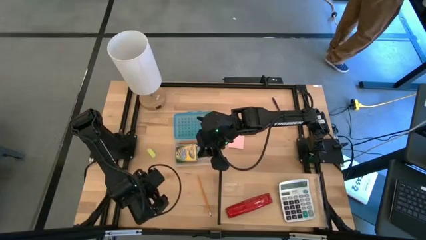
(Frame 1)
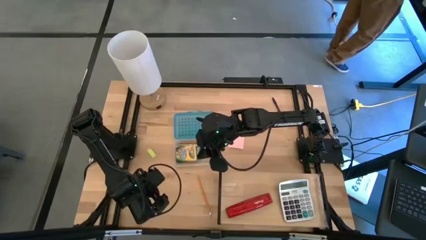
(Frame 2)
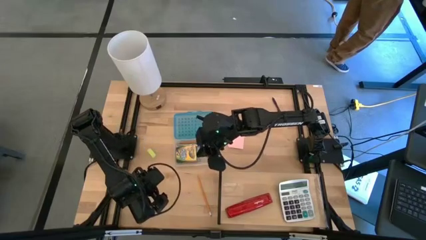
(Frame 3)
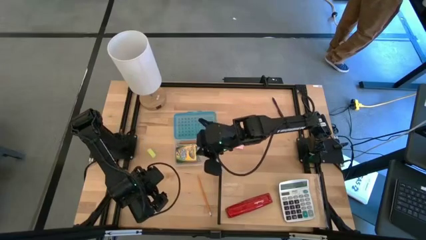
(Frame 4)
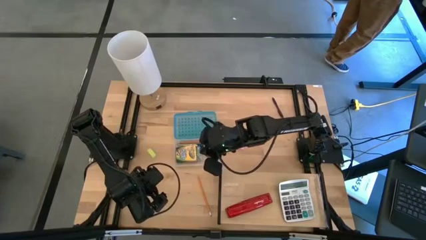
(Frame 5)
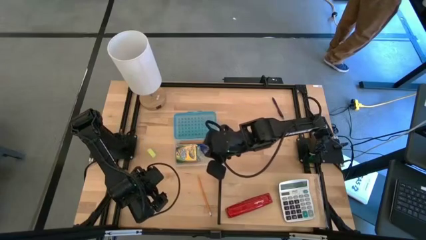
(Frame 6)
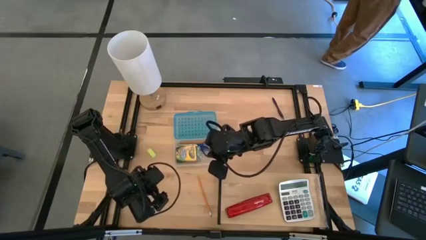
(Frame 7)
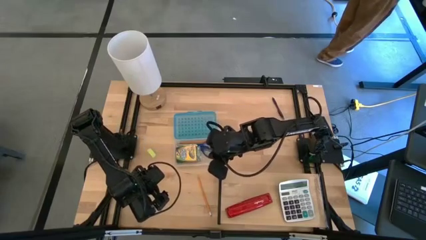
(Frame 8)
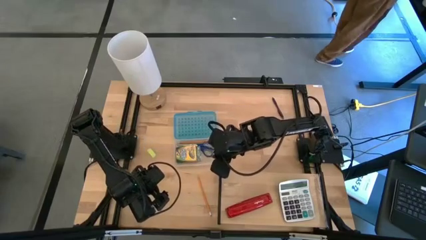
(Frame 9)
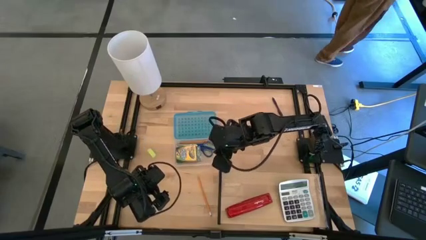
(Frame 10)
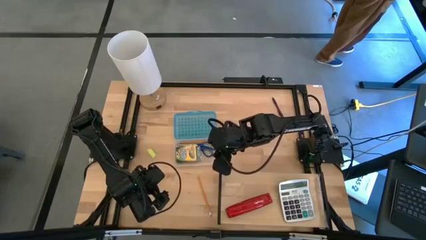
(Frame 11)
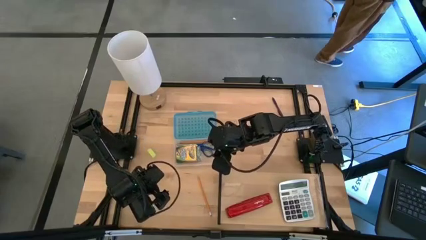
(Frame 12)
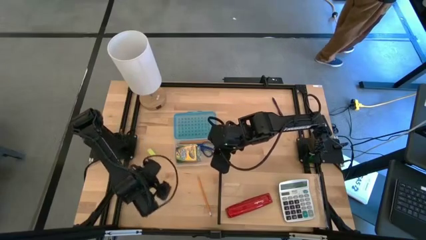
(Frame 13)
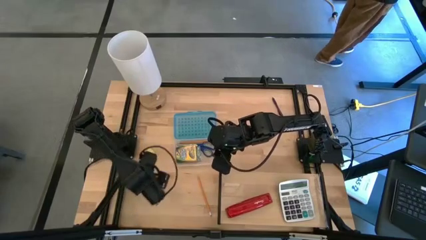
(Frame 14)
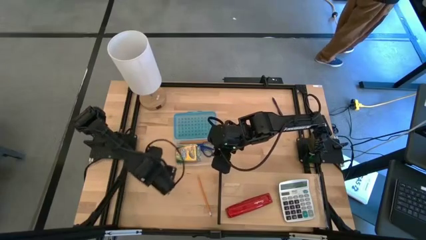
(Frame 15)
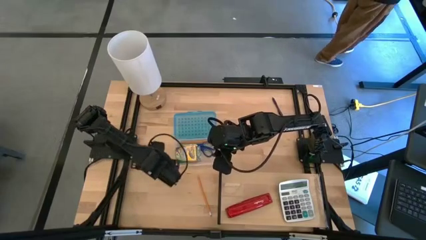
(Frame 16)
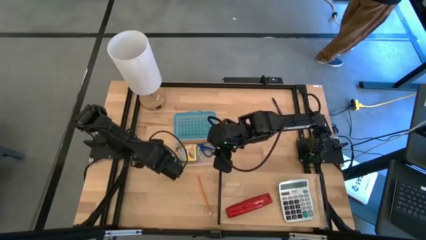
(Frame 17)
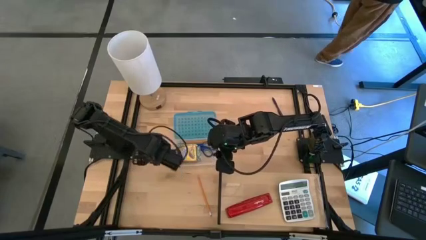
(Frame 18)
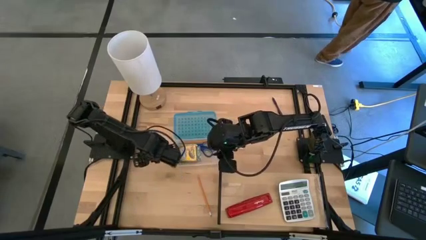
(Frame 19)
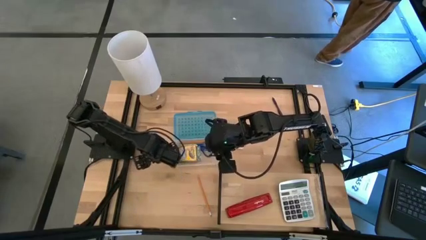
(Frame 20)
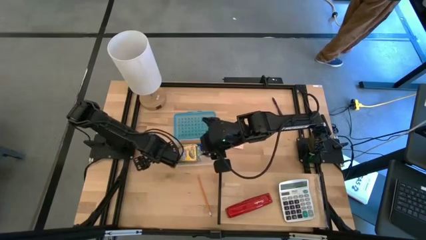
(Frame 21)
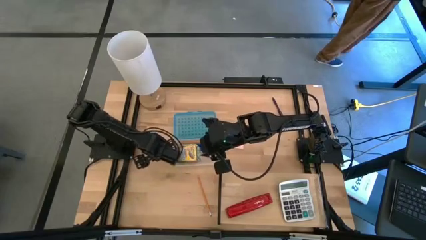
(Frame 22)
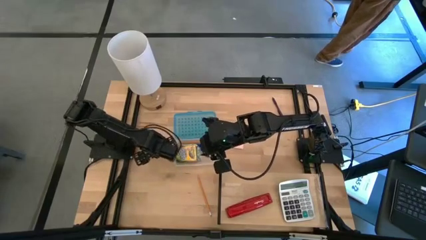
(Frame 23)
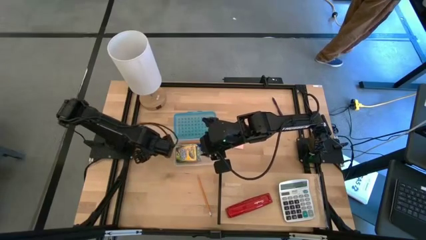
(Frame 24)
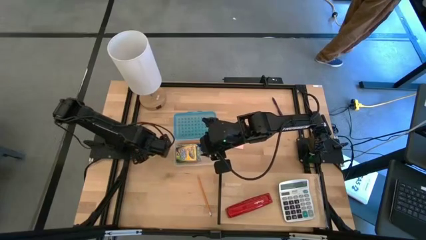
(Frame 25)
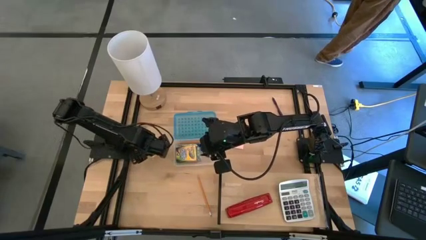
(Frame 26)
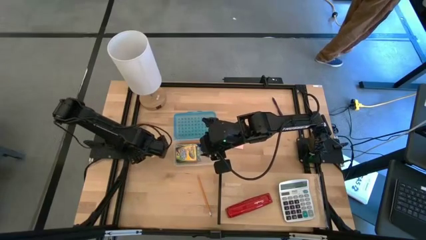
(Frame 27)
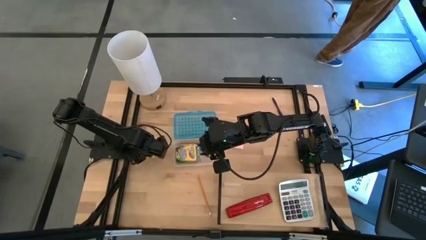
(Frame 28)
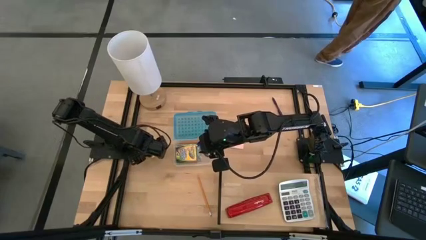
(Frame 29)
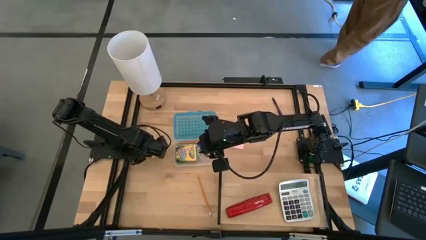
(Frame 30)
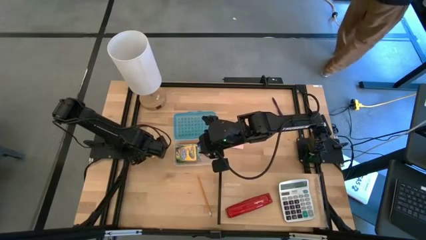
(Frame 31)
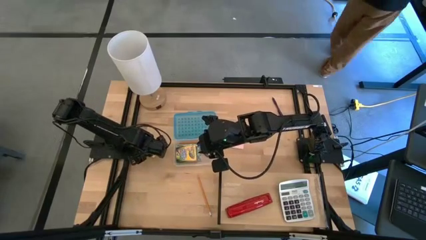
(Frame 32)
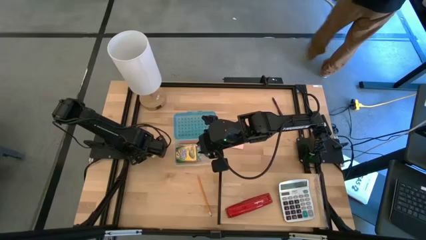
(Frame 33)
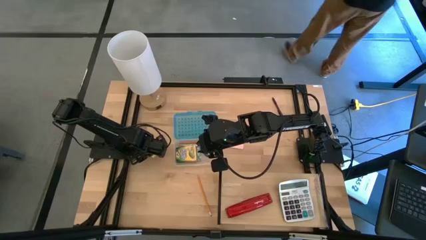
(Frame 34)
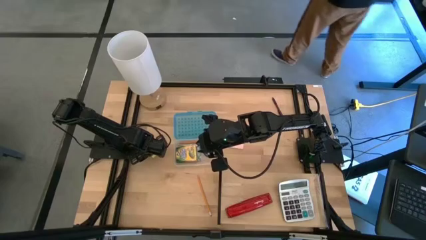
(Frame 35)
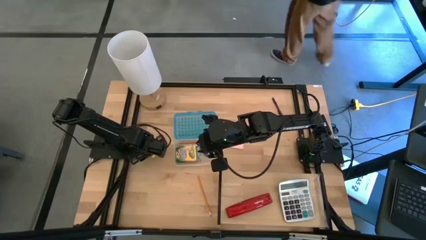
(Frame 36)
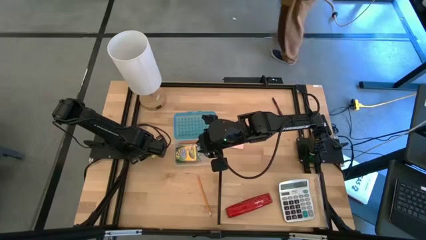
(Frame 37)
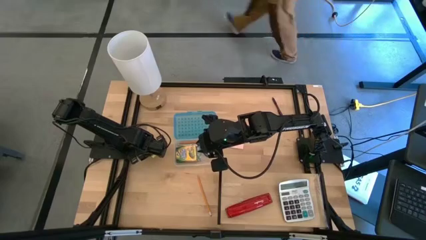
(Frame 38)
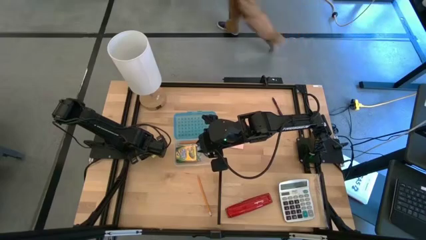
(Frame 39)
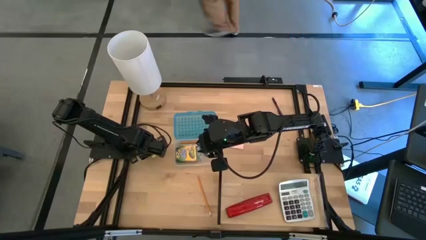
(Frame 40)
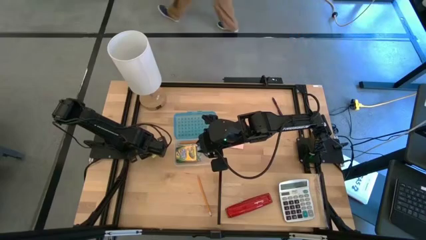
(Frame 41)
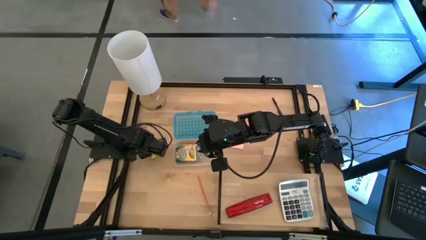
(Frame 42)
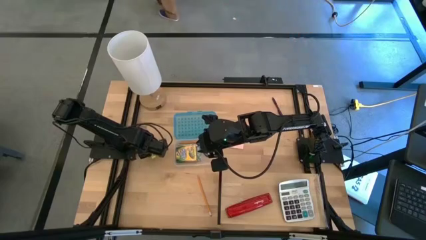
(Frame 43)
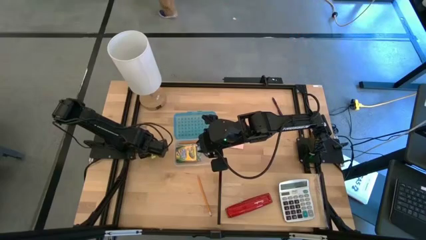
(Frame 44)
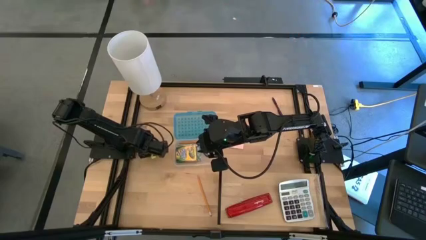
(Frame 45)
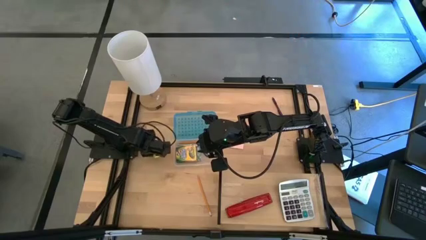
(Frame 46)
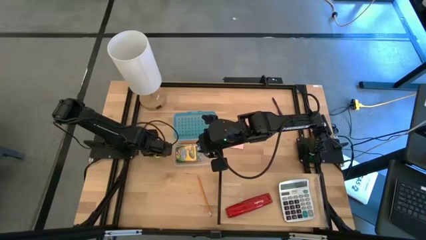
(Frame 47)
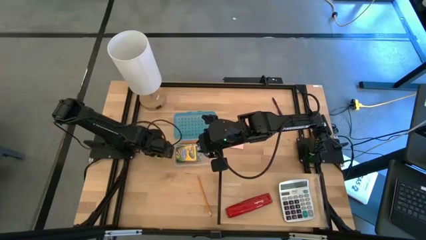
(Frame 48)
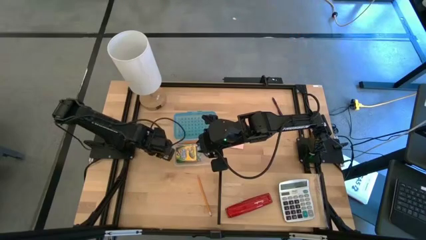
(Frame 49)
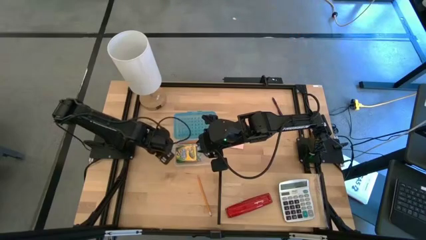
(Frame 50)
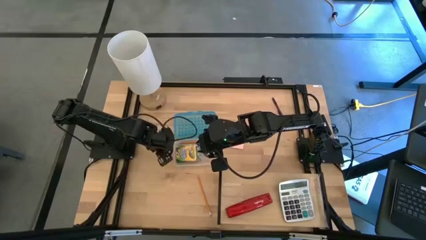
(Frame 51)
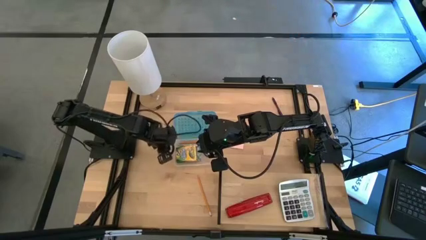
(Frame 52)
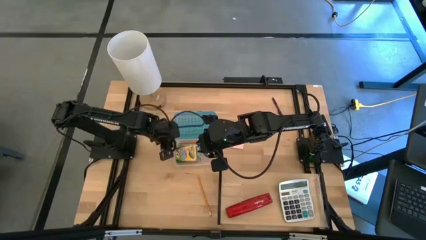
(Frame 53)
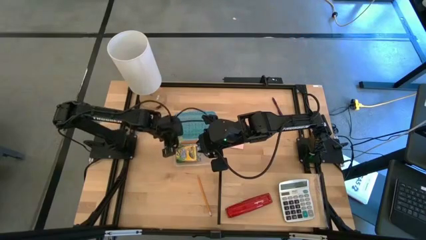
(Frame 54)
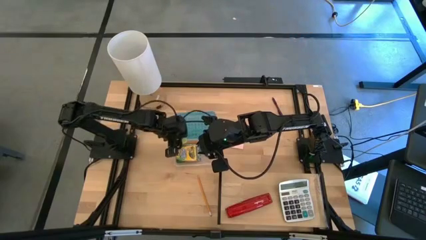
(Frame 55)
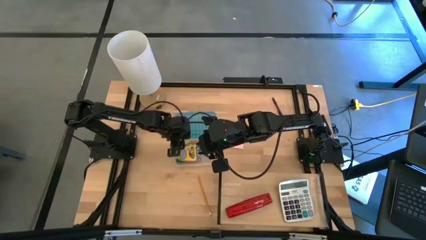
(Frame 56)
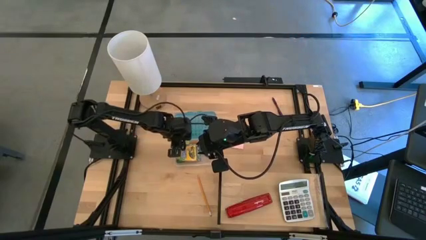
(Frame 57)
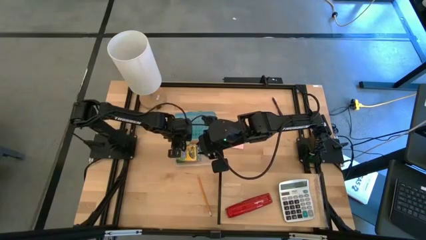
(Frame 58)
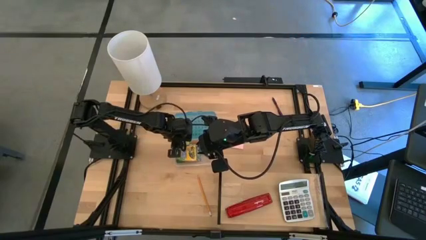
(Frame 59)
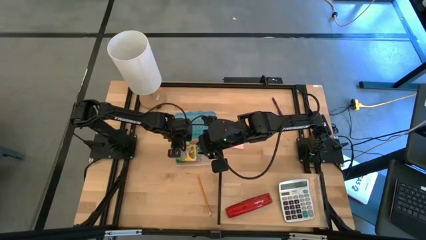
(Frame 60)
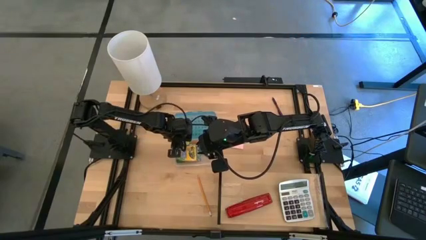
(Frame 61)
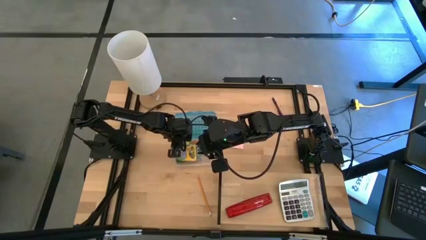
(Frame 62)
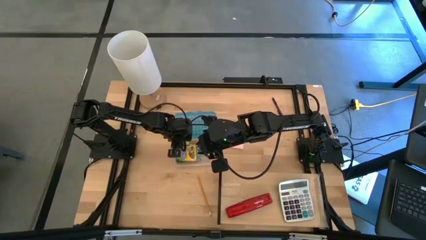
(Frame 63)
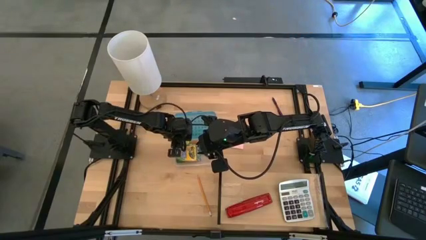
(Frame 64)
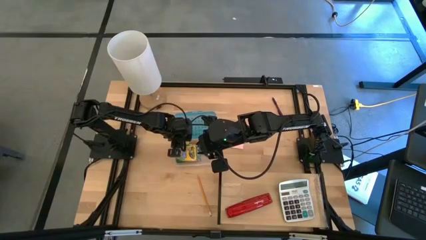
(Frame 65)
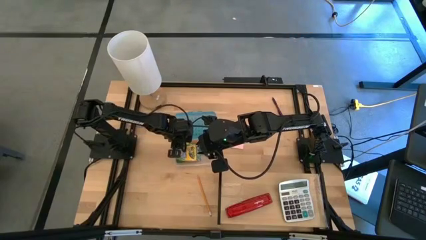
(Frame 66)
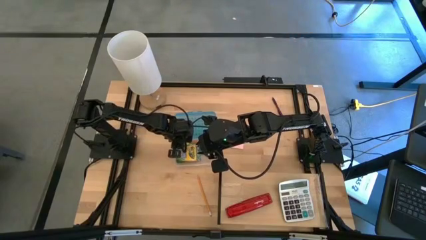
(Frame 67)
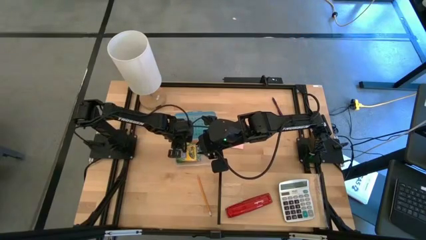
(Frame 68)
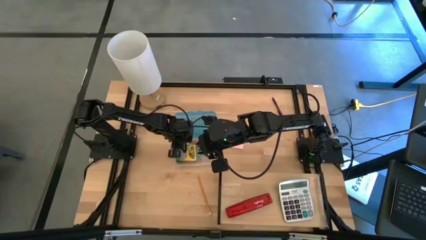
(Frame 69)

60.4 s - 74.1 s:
Task: Pack school essentials
Put the yellow eraser into the blue supply box

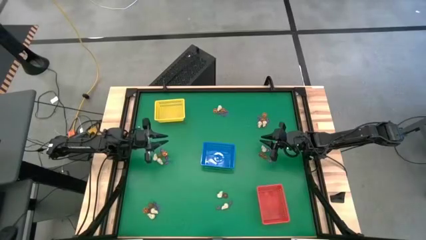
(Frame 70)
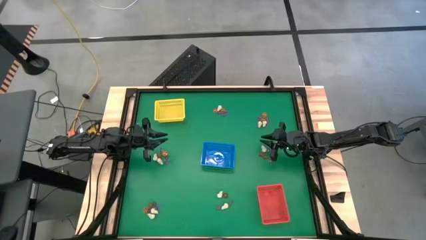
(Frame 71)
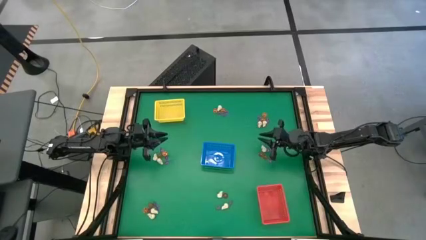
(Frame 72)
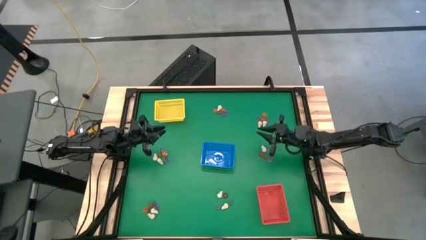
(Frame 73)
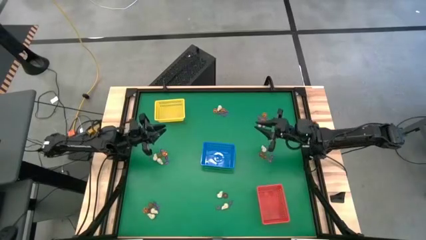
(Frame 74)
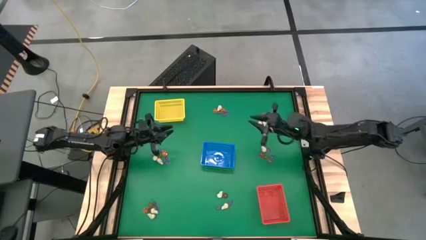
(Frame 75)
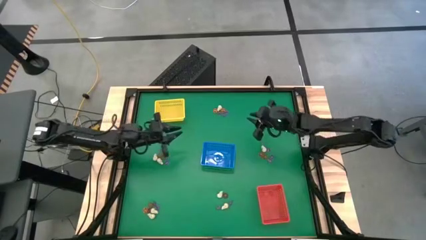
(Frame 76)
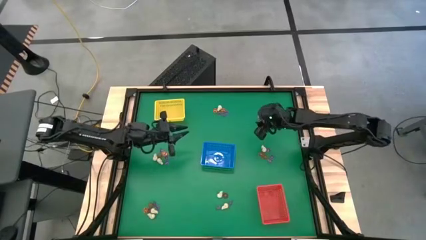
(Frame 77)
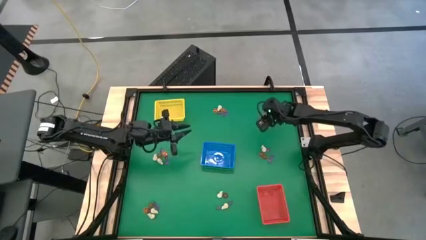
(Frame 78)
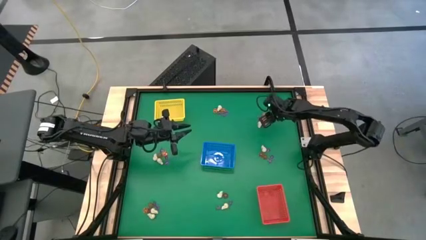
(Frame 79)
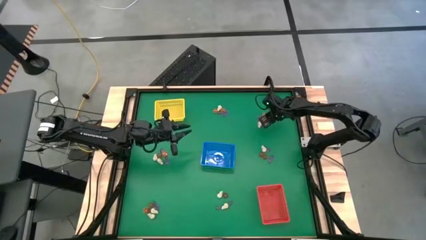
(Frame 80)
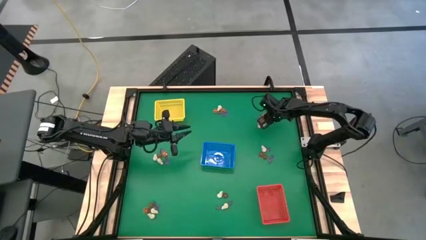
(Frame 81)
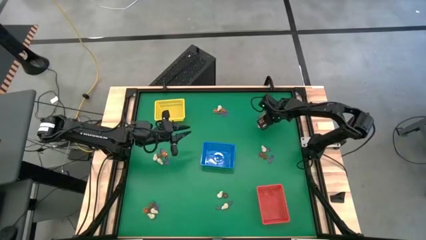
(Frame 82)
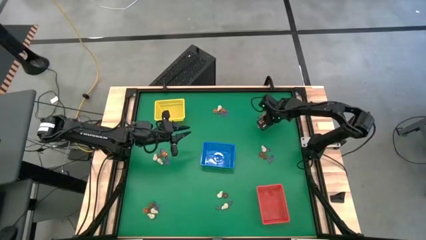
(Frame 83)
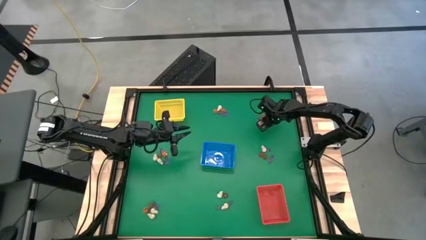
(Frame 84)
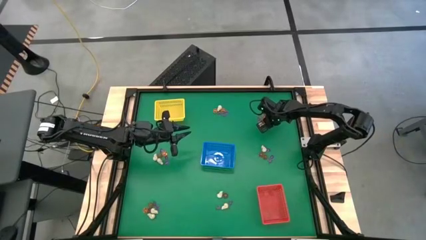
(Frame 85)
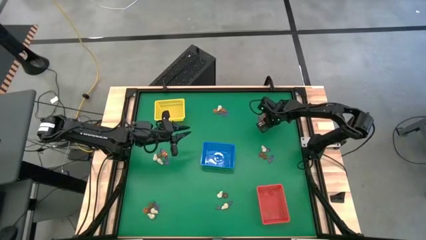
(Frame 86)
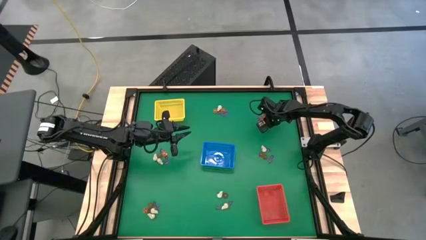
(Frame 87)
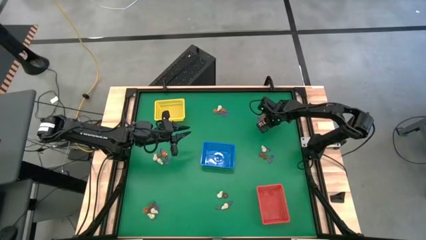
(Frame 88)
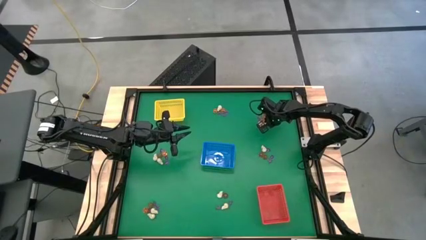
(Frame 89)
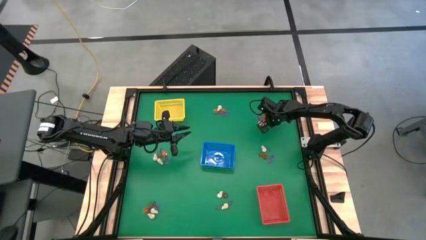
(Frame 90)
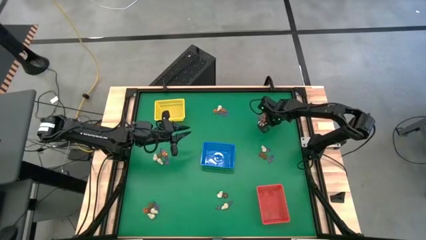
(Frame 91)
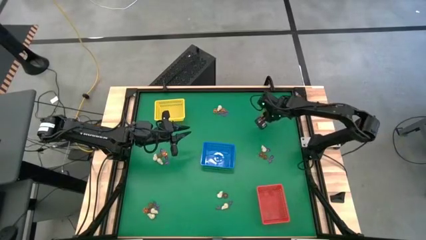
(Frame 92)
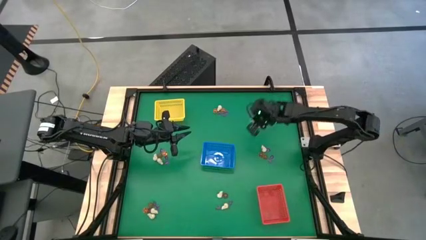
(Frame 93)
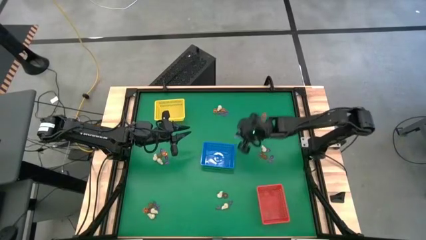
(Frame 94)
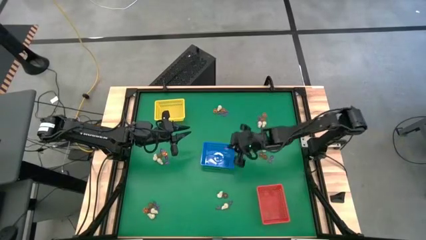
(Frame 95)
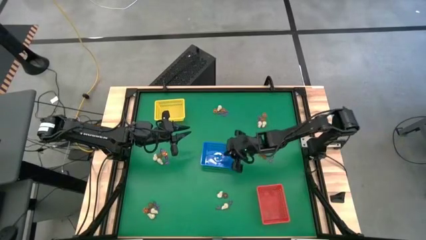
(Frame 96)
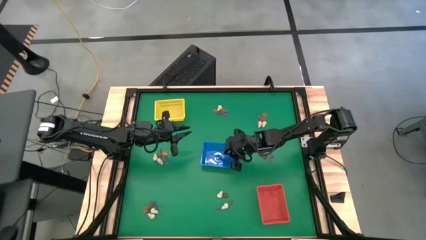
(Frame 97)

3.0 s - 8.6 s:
Task: Sort Halloween decoration
Put the witch hat toy into the blue bin
